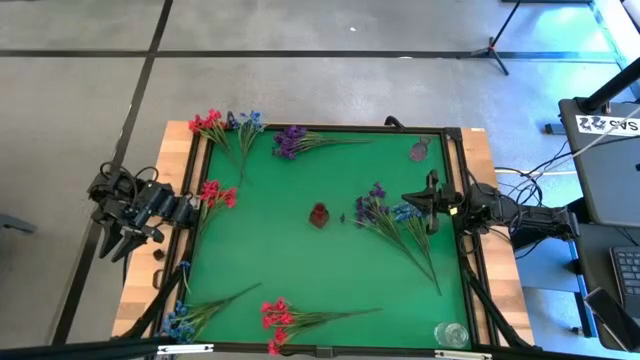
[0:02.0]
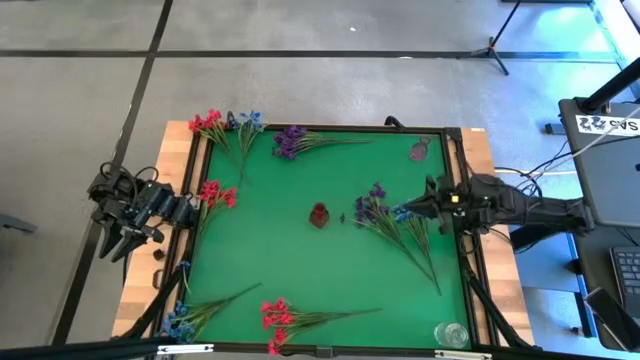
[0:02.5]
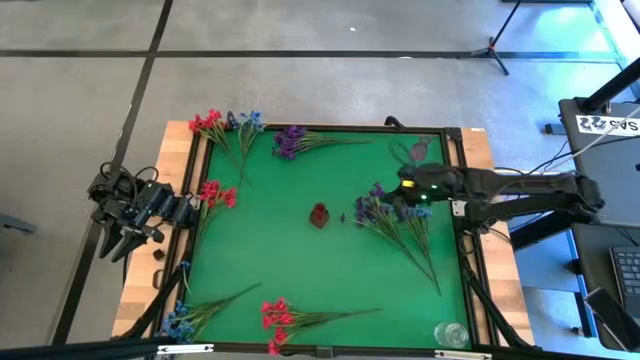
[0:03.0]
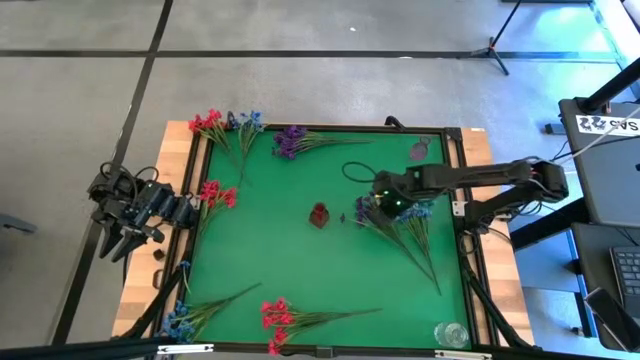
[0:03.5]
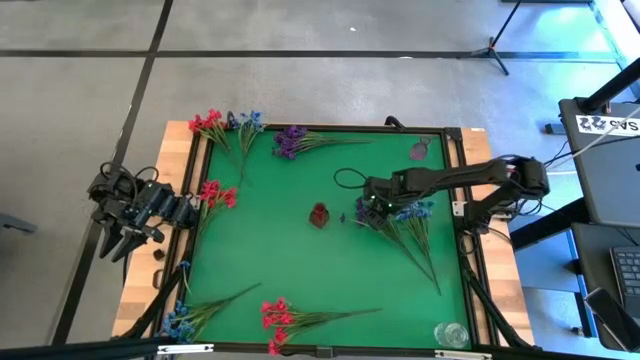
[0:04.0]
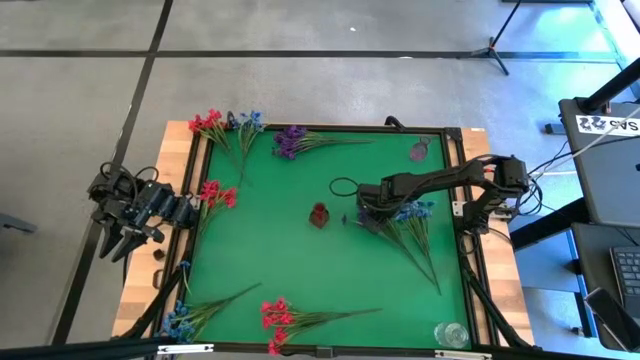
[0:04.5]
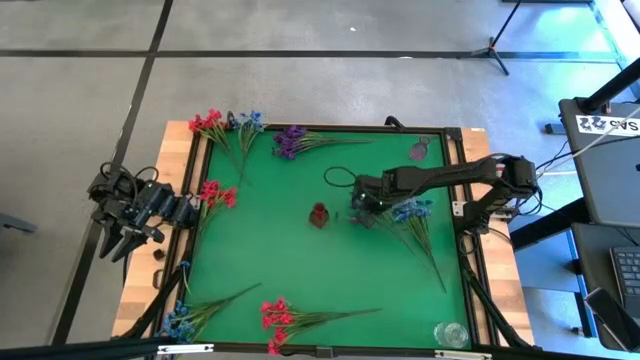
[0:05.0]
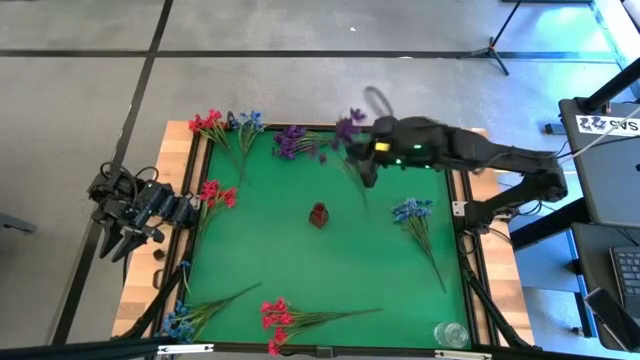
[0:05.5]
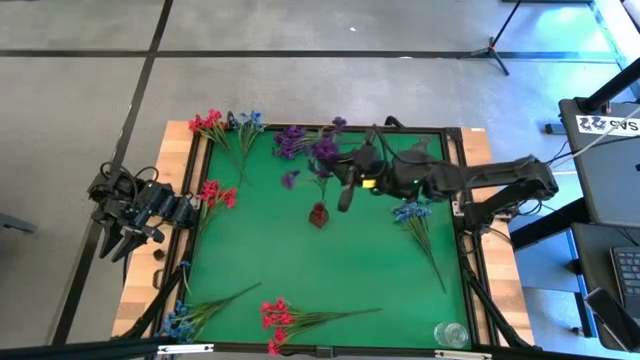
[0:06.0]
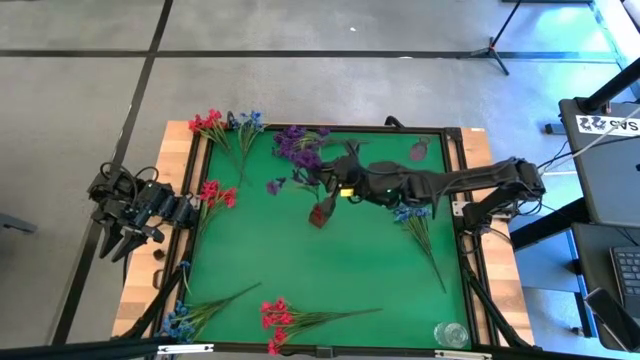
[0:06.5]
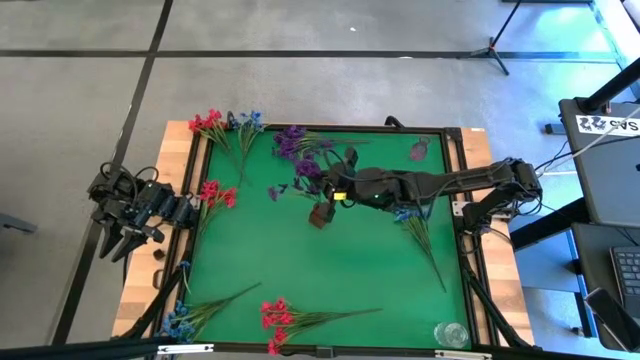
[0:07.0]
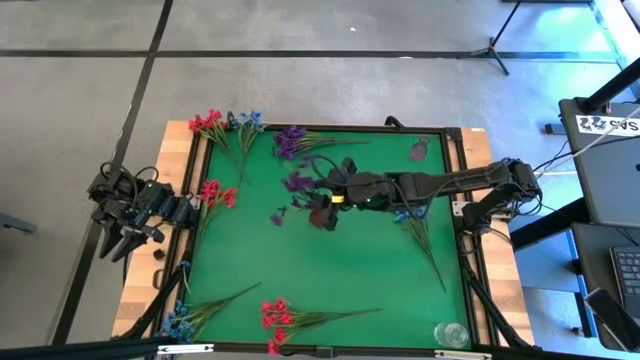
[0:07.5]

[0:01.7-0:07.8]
Task: Sort flowers into vase by color
Put the bottom violet flowers into the red vase

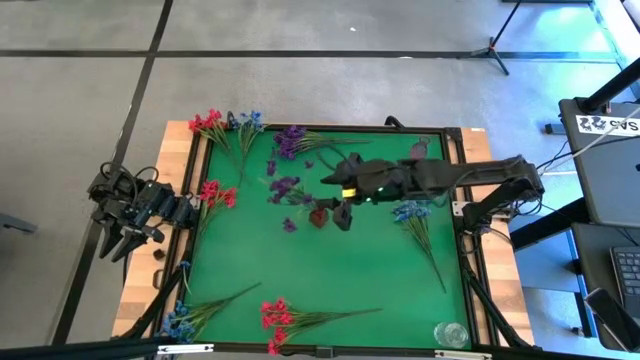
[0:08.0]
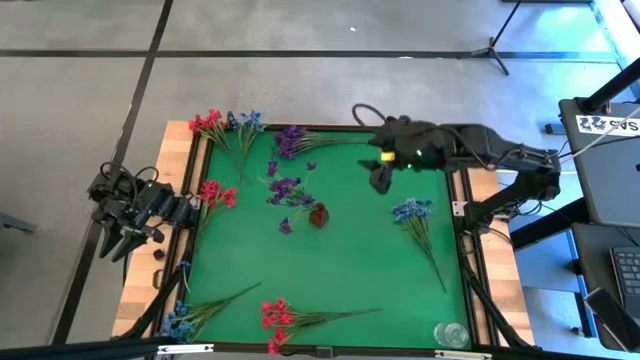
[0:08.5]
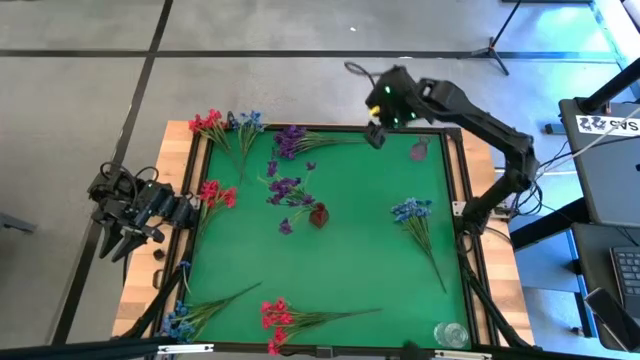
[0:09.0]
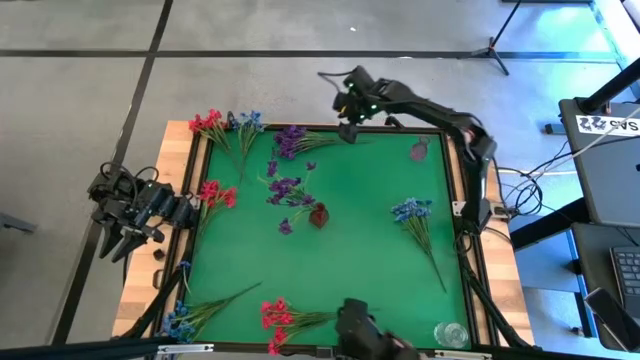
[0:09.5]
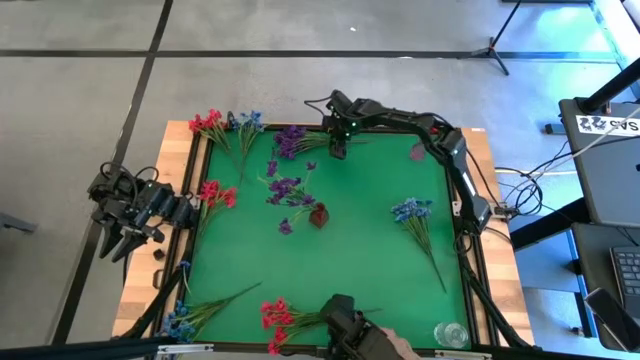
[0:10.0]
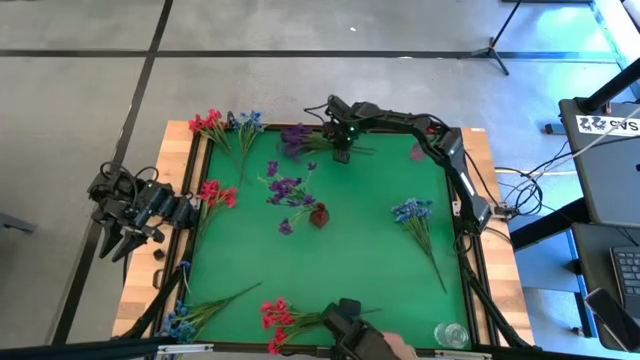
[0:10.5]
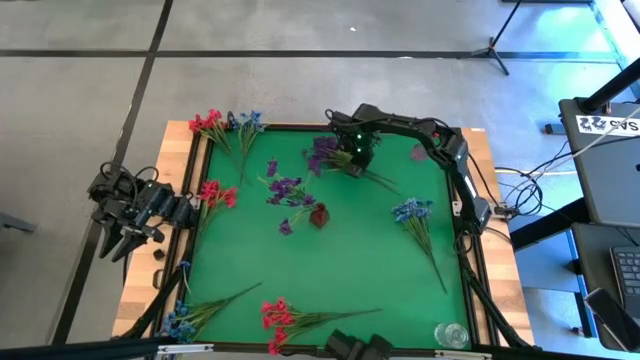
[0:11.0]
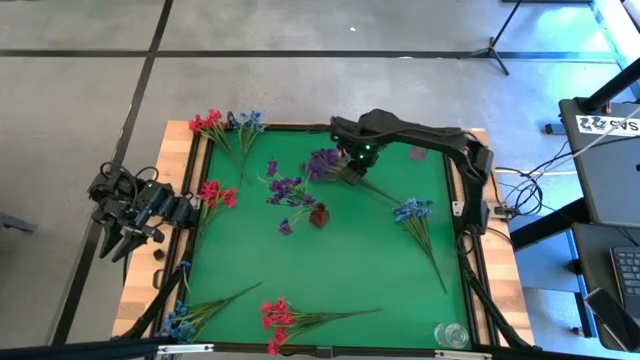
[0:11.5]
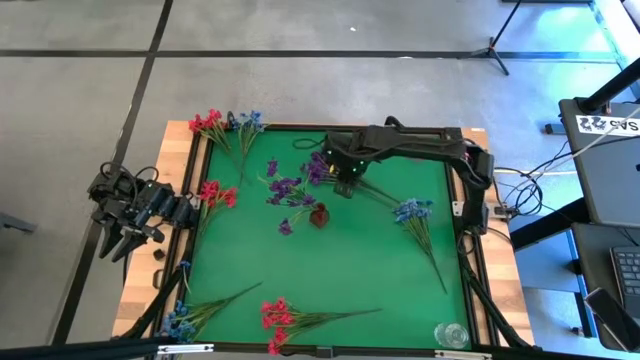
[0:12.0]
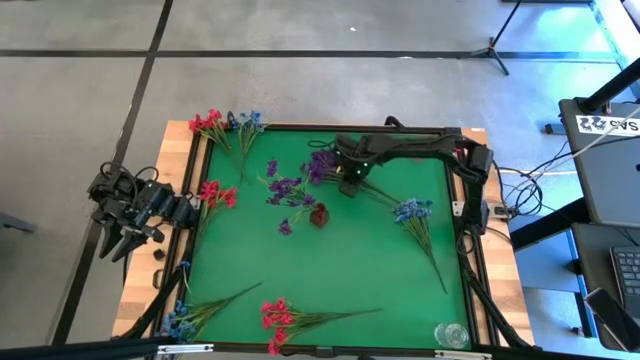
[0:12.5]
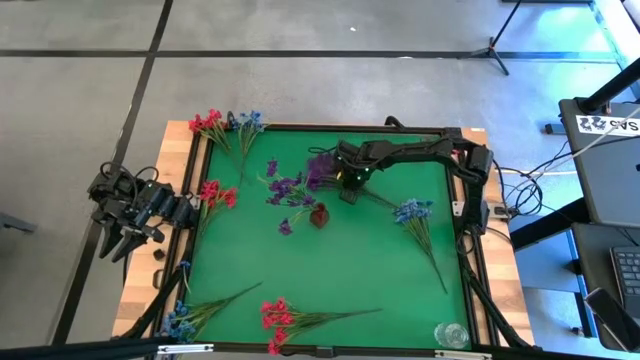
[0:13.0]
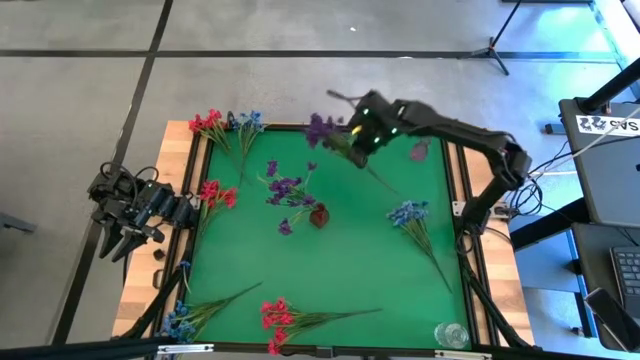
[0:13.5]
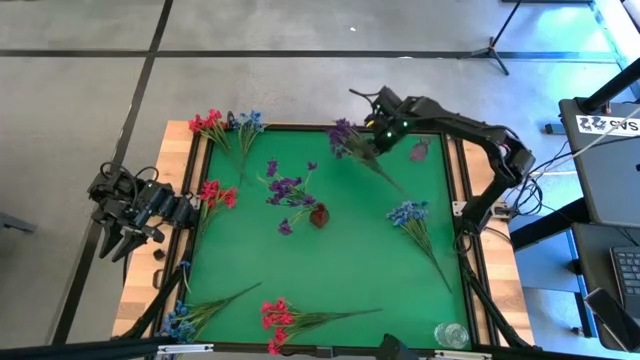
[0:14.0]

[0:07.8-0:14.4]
Put the left violet flowers into the red vase

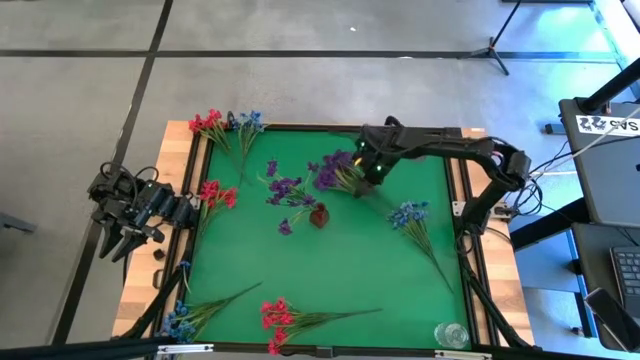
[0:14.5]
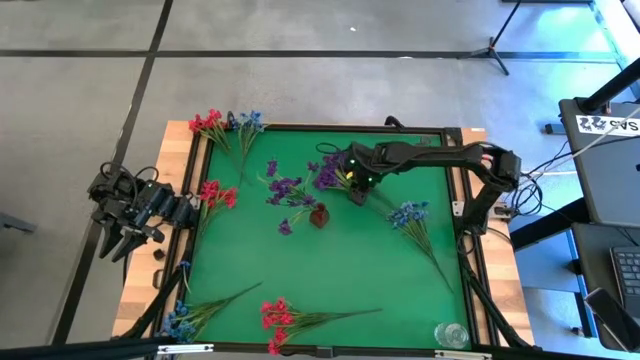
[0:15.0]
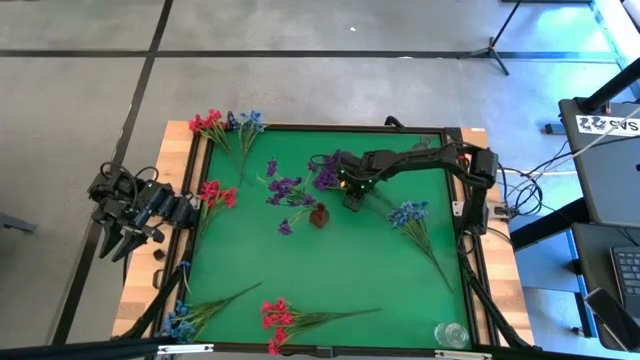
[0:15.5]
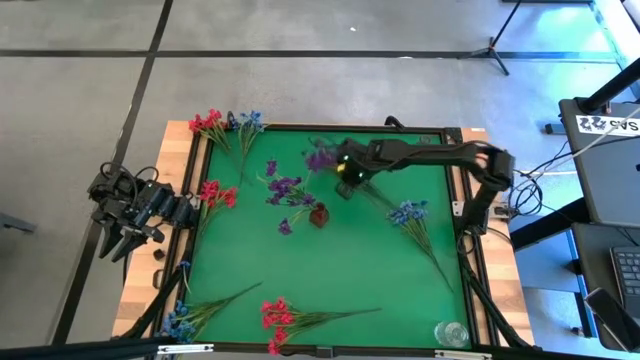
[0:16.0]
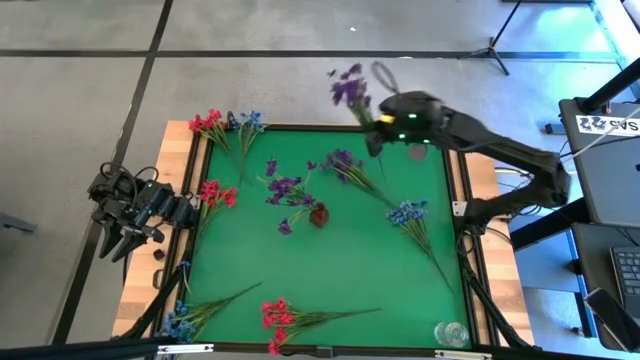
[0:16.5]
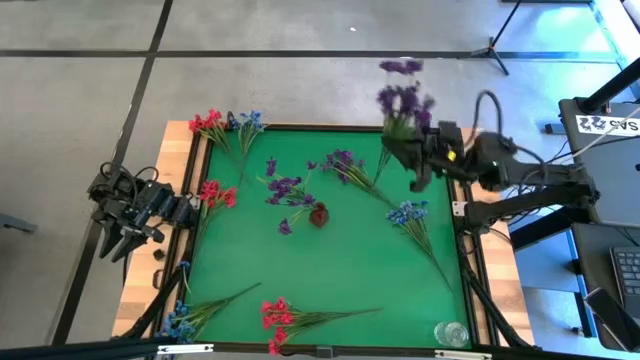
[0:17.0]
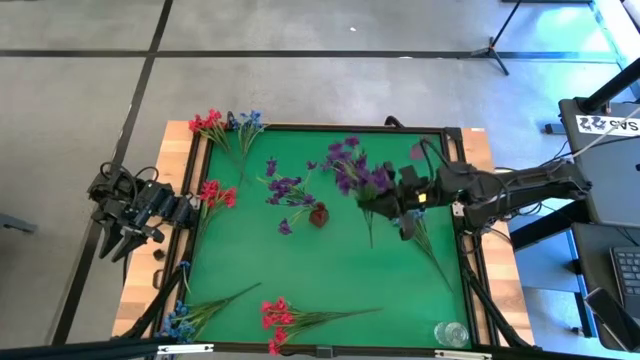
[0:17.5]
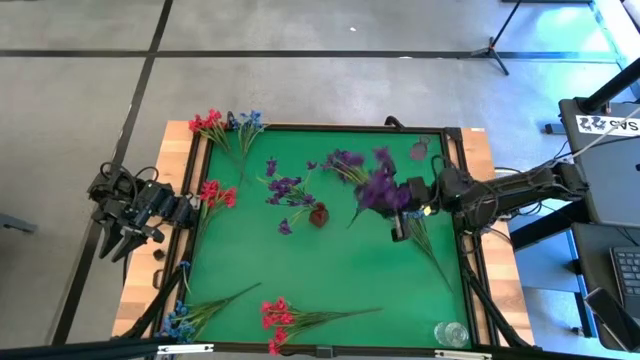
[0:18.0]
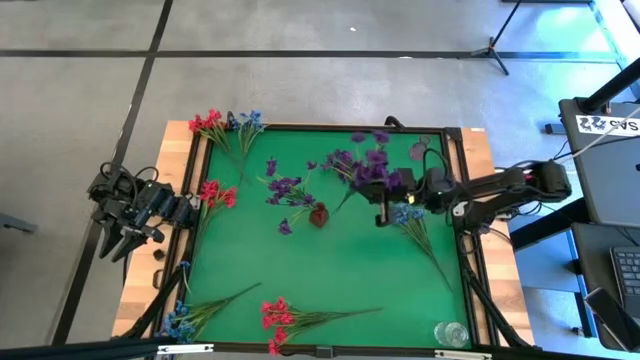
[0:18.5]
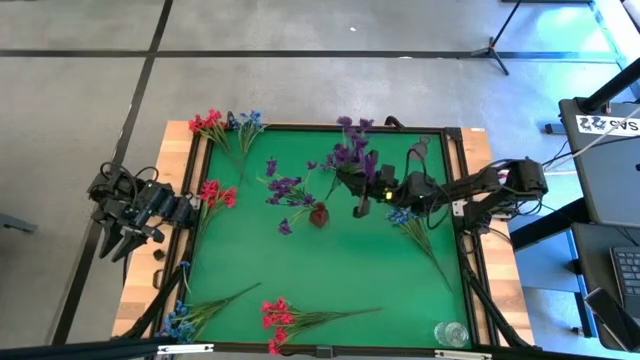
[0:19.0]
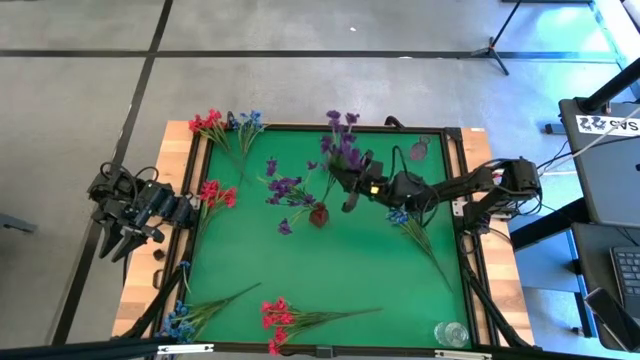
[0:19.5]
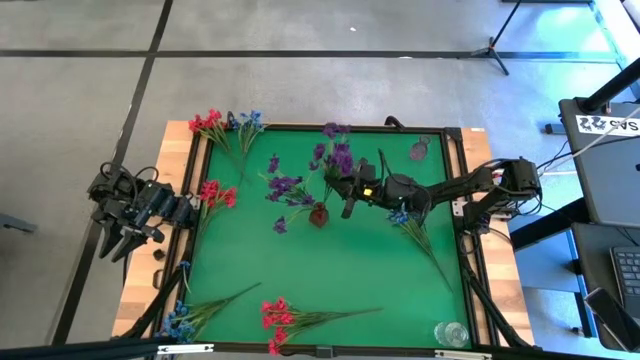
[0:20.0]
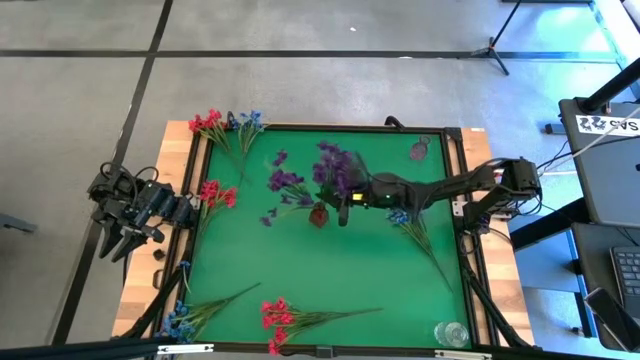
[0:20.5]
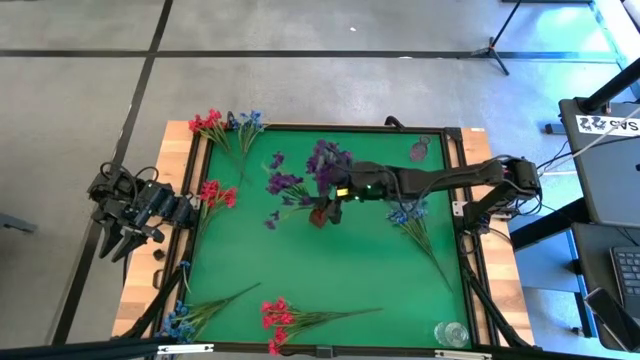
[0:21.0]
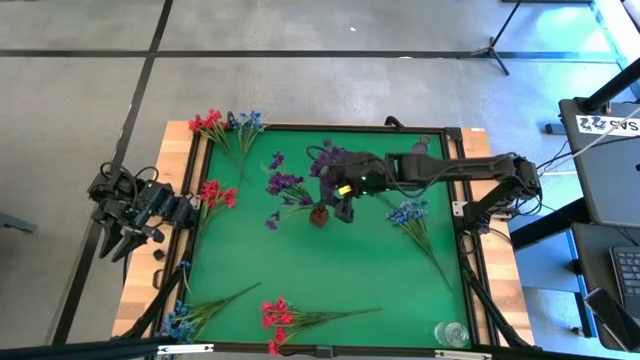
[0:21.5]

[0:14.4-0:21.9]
Put the left violet flowers into the red vase

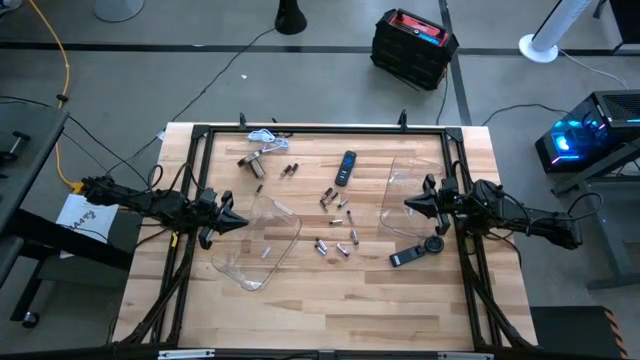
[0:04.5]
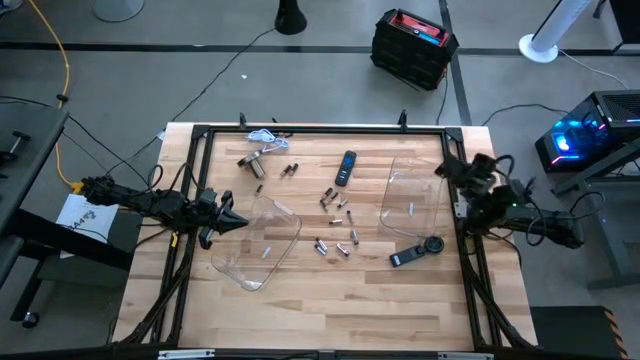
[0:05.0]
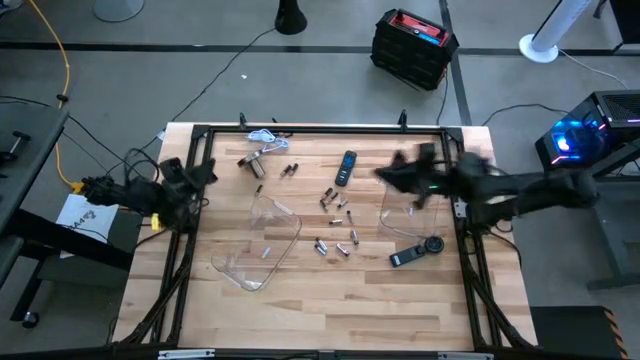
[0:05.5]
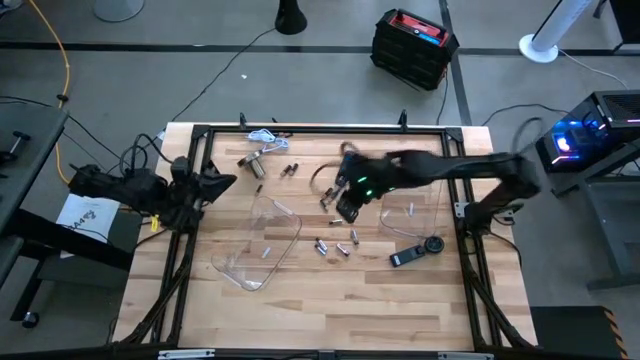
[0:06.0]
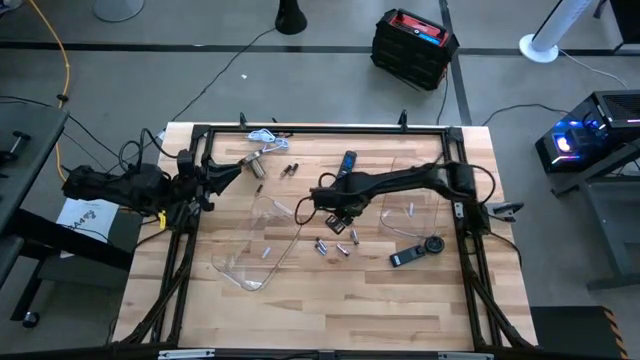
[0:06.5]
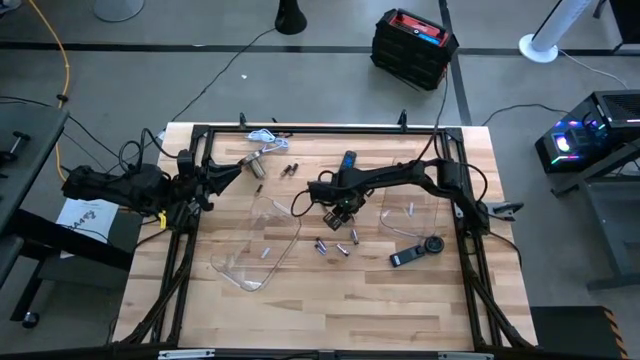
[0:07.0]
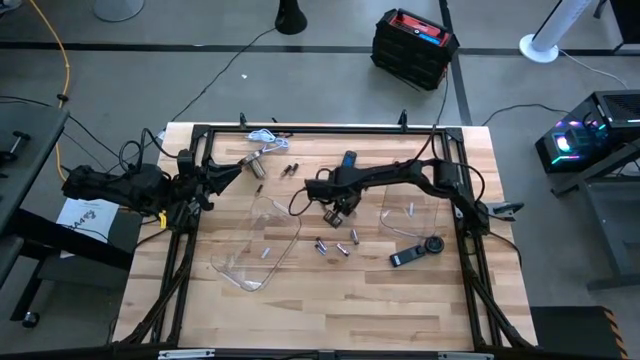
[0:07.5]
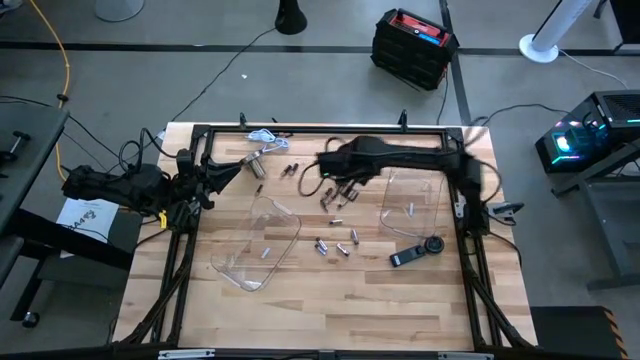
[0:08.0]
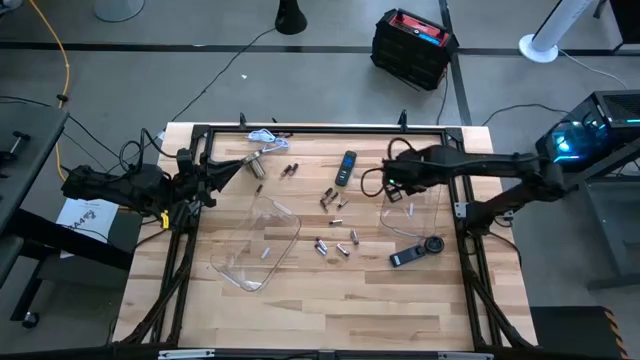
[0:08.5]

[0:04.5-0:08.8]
Task: Sort batteries
Put the white battery into the right transparent bin
